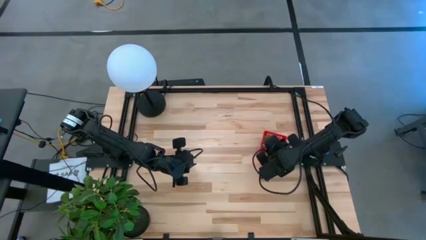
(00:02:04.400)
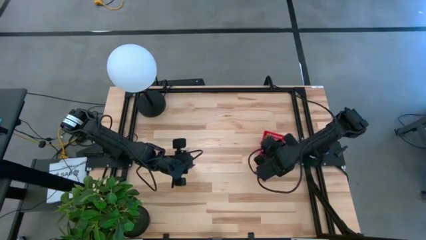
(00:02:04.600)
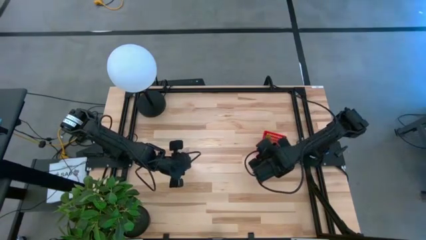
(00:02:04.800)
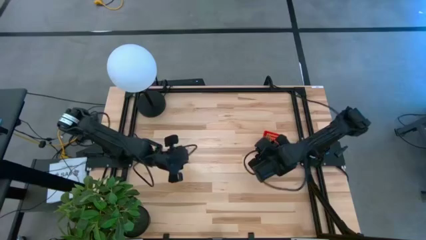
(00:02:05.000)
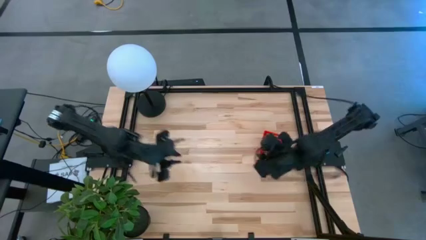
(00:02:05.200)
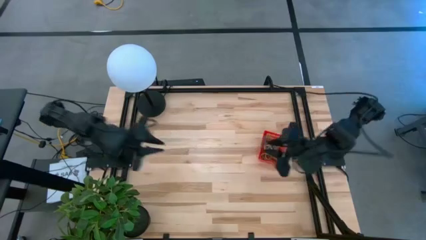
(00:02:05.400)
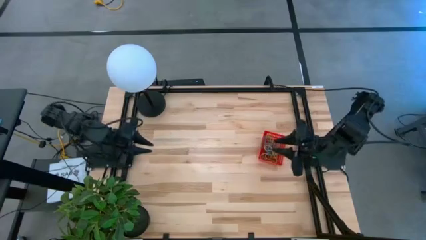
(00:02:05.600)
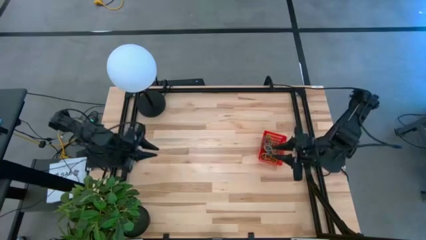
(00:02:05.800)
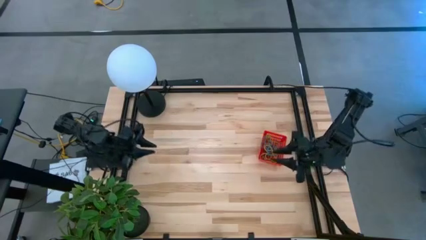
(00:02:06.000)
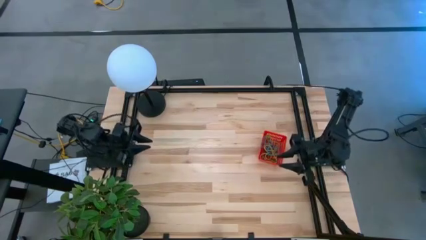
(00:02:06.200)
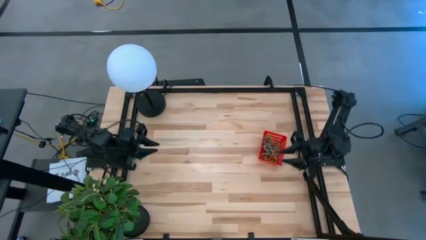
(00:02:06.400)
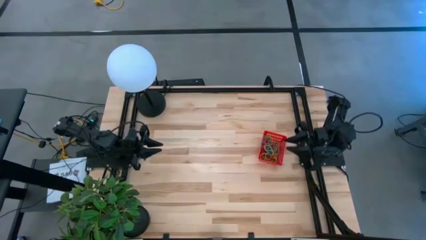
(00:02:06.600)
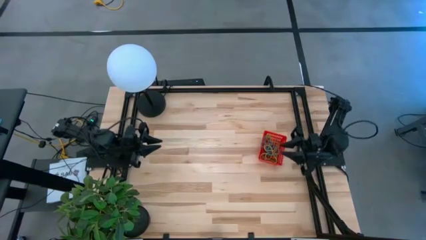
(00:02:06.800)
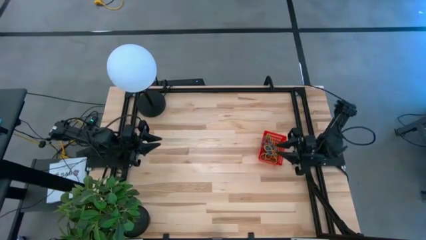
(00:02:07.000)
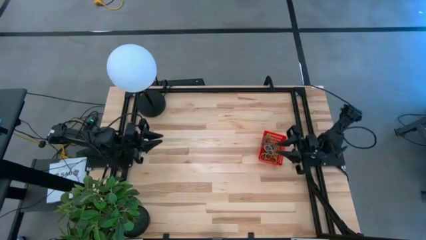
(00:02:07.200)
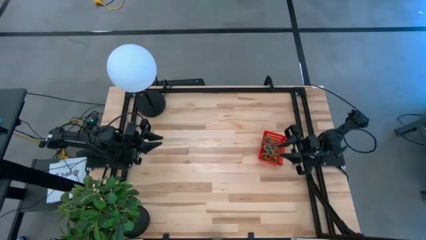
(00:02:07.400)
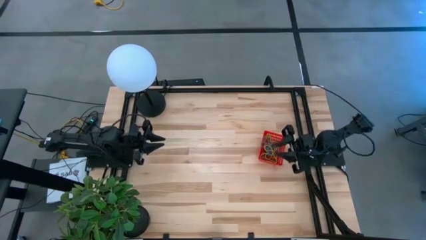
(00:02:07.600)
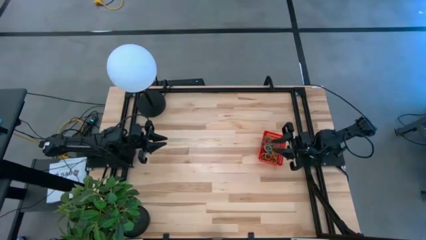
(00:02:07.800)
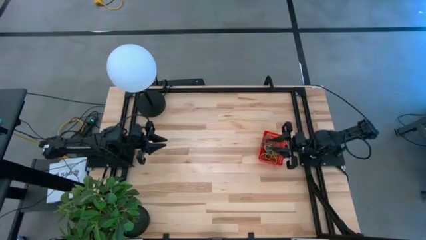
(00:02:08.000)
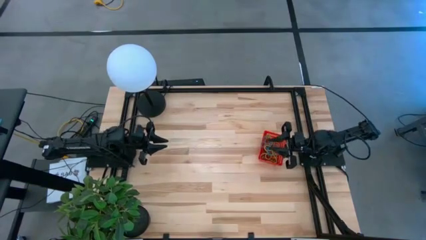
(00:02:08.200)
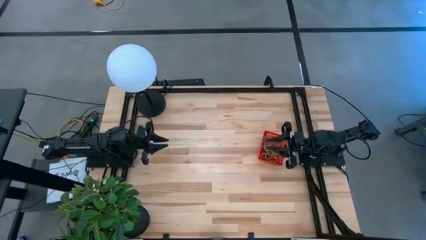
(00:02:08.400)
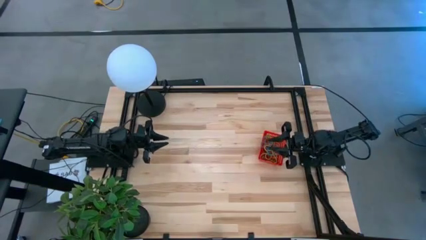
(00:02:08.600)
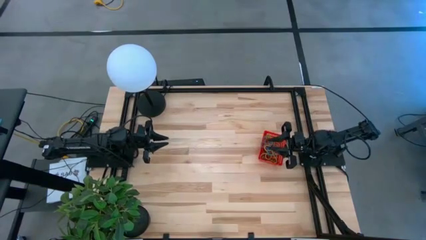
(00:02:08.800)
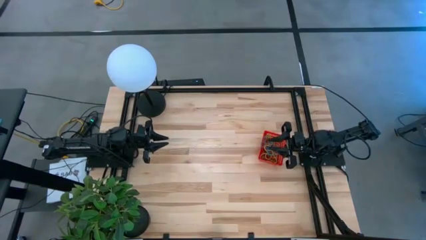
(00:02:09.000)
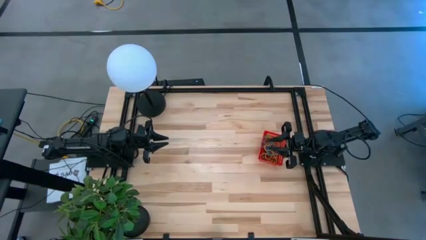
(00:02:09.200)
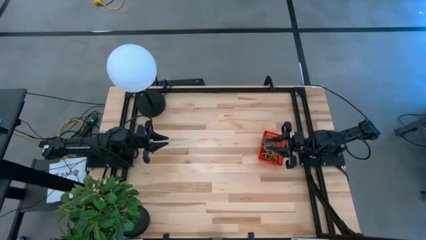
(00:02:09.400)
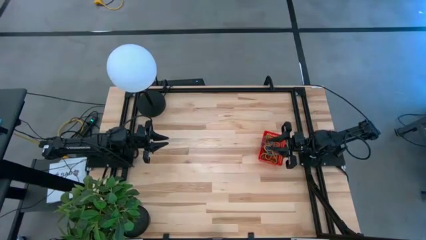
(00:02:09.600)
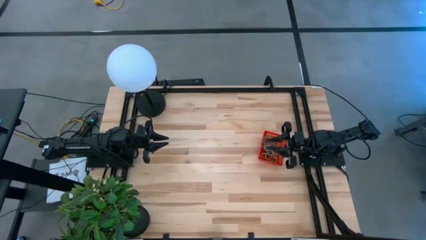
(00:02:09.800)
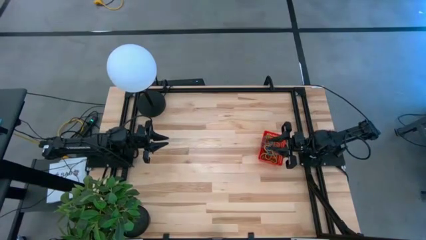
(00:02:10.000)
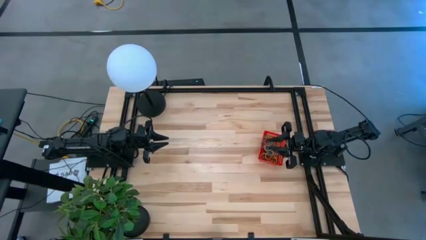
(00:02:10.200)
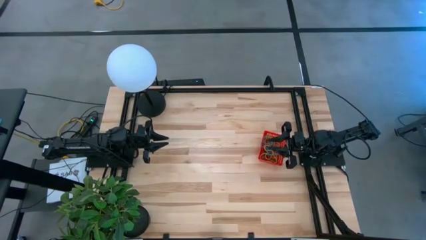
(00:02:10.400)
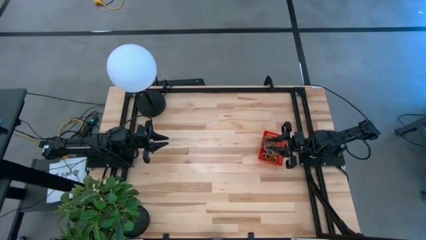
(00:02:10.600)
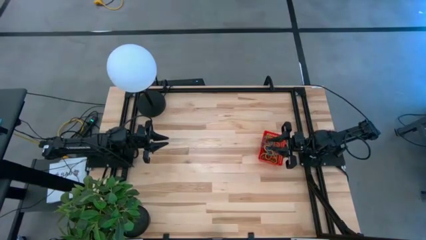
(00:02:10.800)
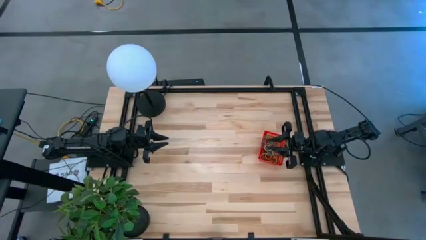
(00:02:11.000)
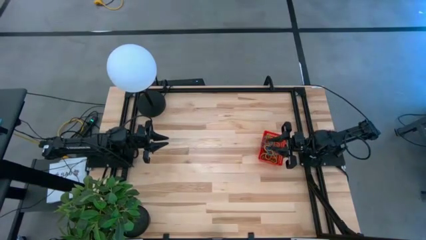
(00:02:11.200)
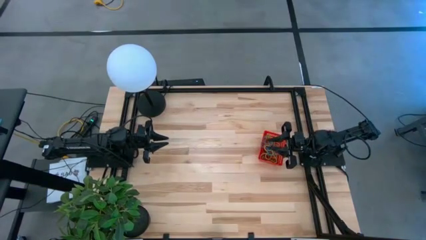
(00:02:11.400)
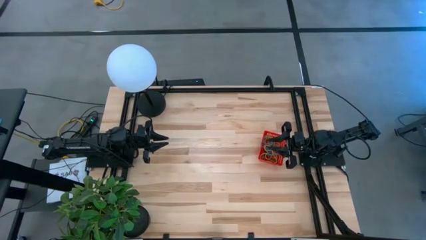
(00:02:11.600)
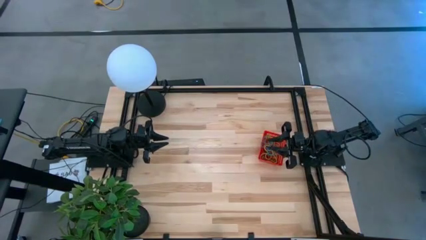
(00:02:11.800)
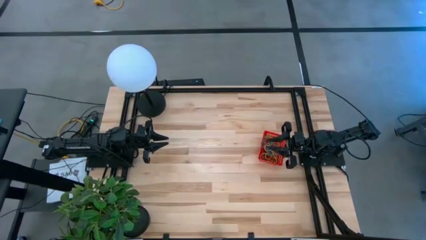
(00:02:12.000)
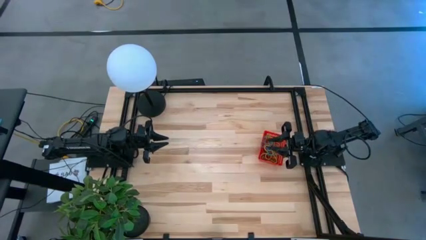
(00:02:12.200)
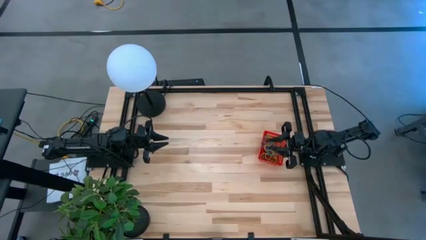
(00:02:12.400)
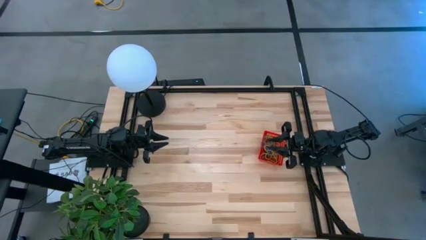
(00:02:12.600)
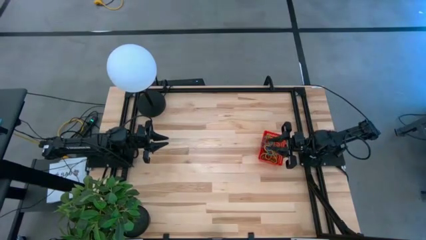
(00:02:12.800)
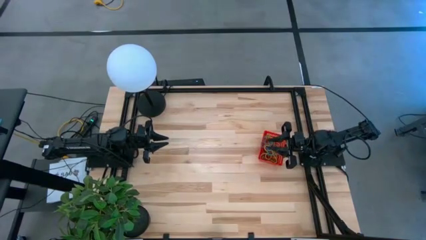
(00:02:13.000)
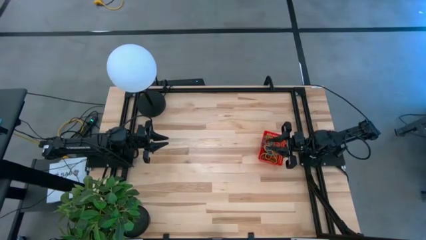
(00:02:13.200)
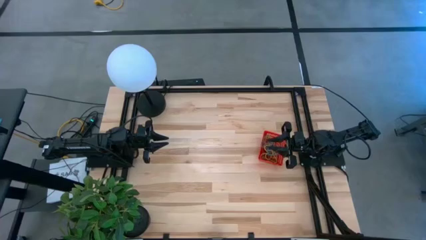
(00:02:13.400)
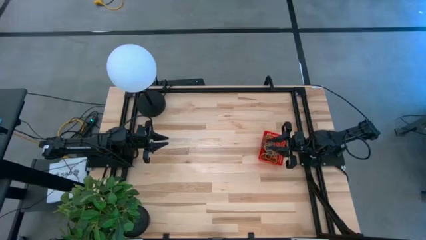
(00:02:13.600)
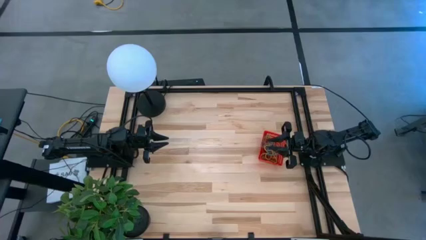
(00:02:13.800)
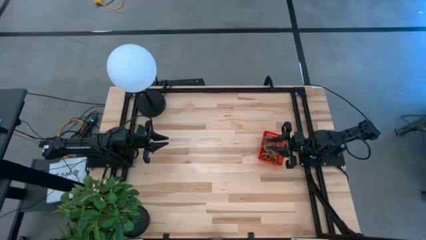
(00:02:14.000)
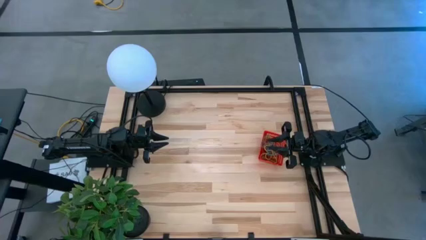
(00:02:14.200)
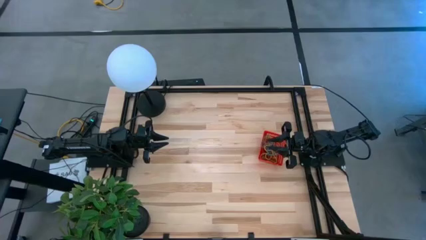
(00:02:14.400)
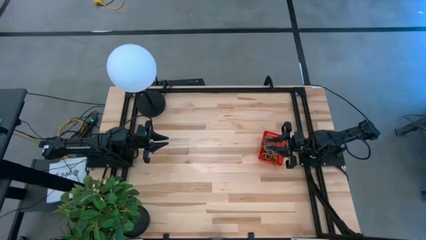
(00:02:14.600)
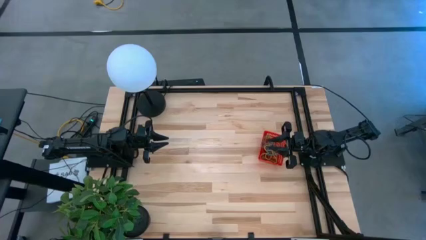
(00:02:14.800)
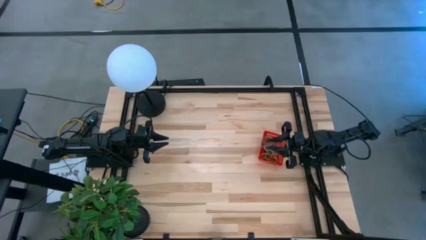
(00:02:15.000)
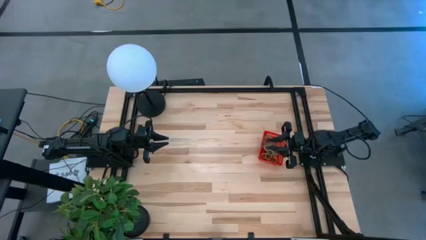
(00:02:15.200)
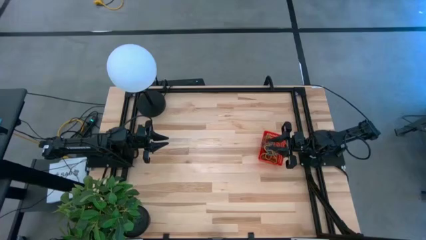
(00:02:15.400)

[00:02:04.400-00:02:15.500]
Task: Pick and place rubber bands into bin
Return to home position

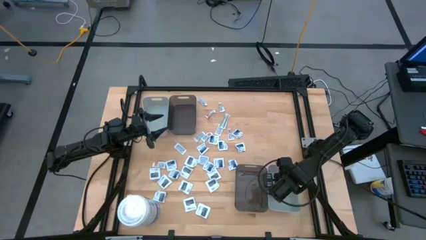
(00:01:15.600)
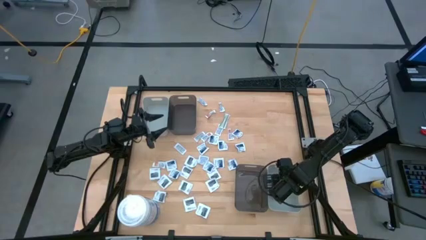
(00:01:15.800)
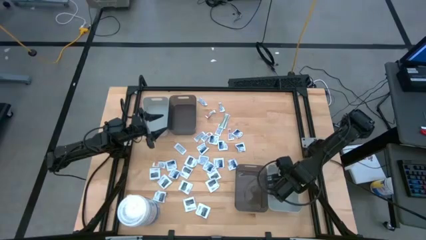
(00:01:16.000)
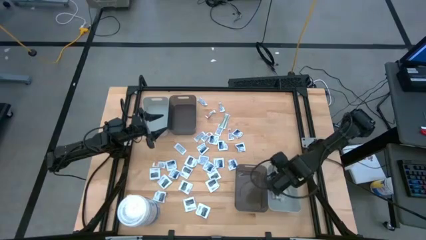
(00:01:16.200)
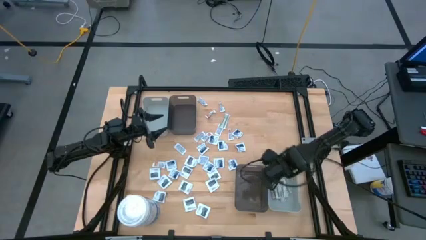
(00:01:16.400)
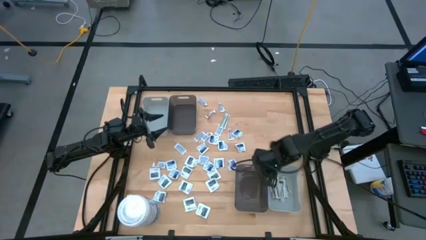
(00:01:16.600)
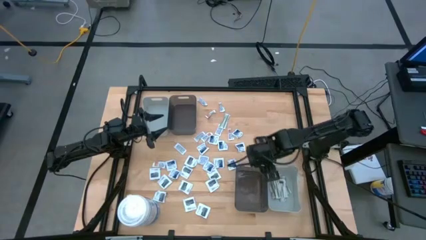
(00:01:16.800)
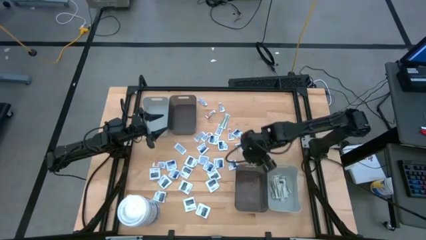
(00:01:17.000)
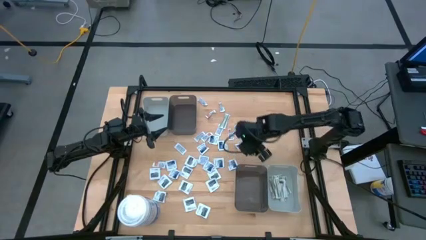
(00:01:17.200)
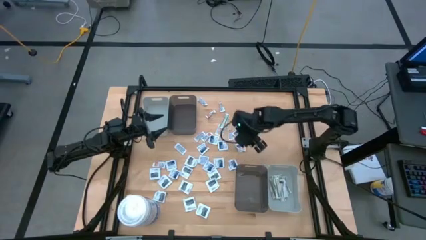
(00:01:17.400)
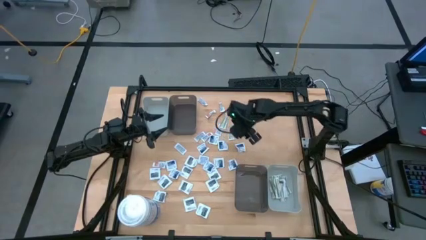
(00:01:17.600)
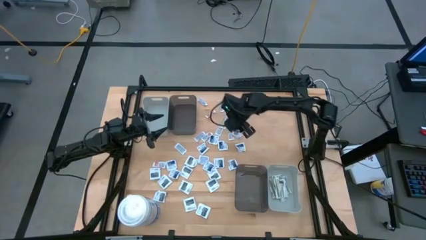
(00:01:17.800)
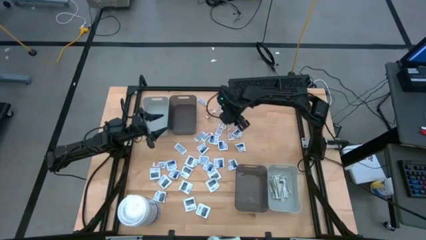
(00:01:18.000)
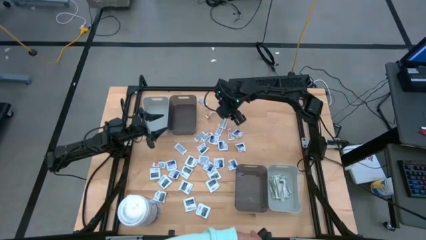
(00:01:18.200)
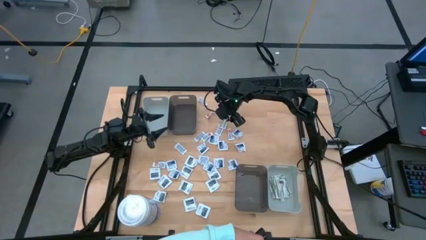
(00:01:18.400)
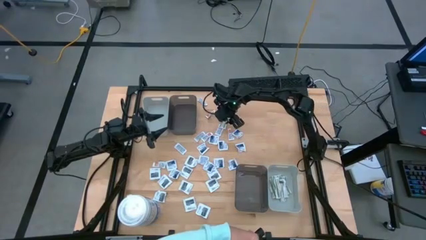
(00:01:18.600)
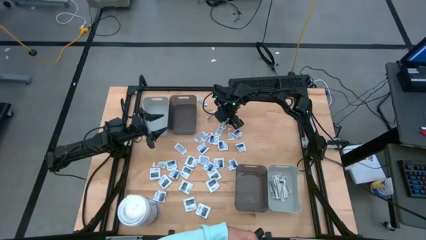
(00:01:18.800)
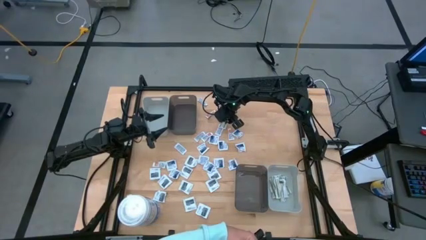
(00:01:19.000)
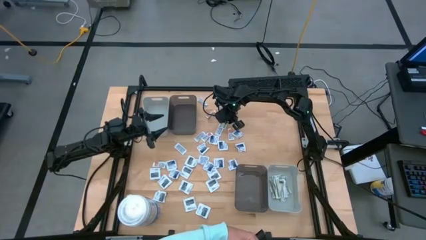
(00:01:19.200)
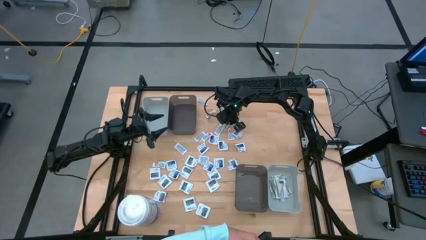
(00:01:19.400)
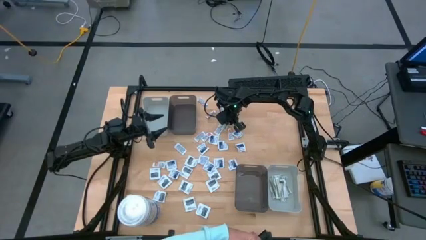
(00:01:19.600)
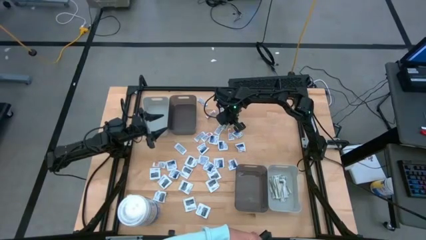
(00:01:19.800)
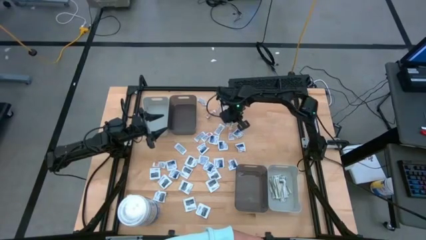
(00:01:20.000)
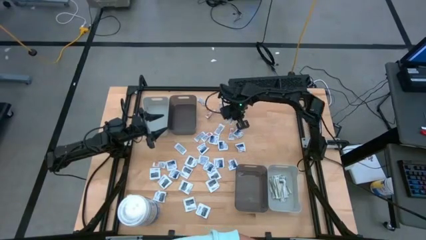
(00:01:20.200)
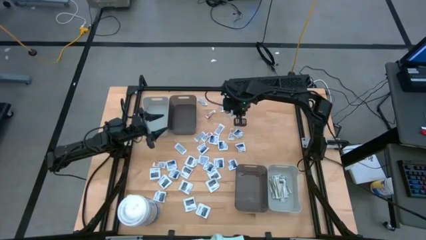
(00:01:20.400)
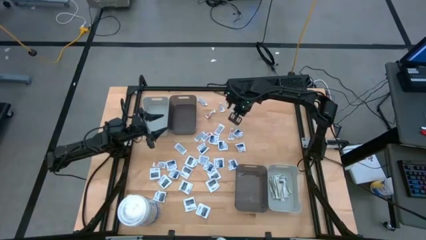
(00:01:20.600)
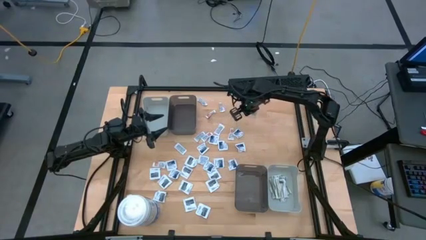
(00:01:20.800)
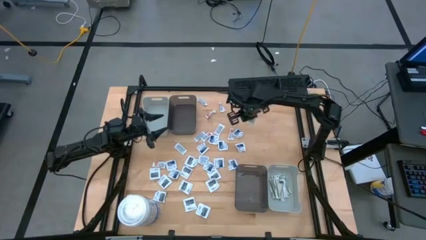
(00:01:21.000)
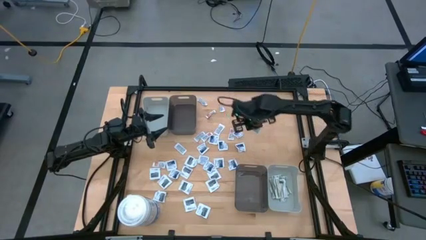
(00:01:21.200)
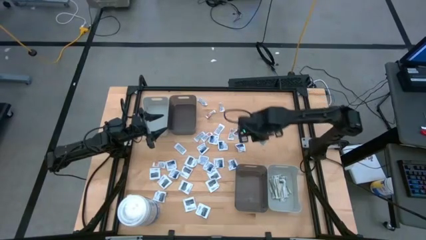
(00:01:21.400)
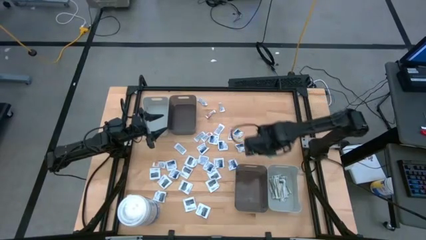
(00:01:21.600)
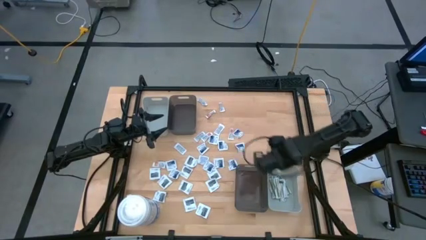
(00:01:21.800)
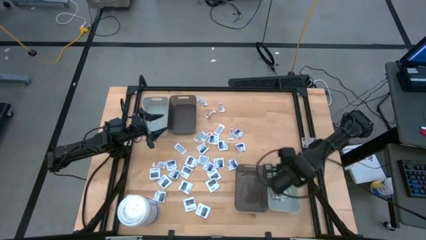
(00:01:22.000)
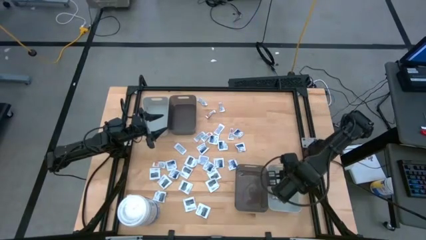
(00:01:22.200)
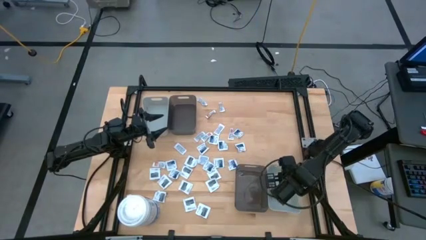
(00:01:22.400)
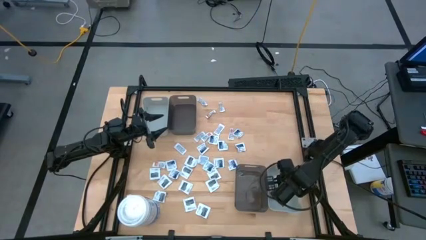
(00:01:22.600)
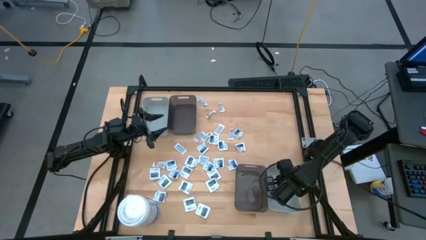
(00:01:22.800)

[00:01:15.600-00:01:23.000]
Task: Pick & Place First Aid Supplies
Put the white bandage pack into the bottom gray bin
